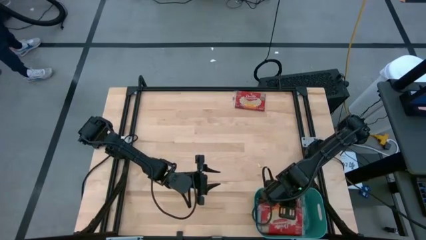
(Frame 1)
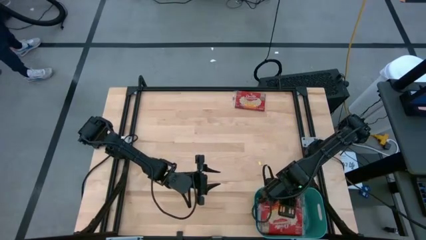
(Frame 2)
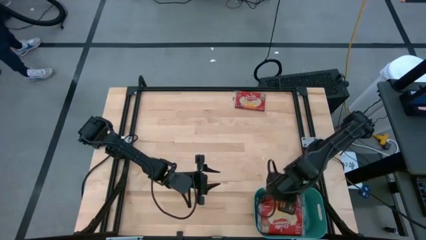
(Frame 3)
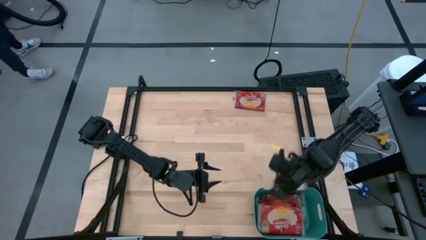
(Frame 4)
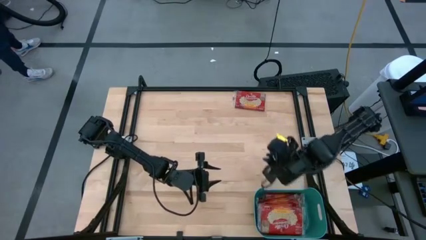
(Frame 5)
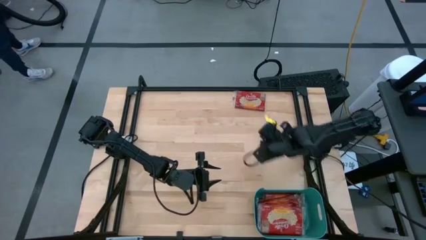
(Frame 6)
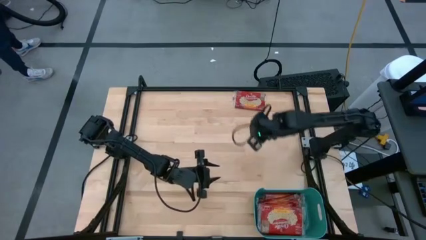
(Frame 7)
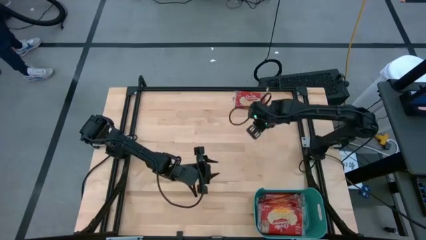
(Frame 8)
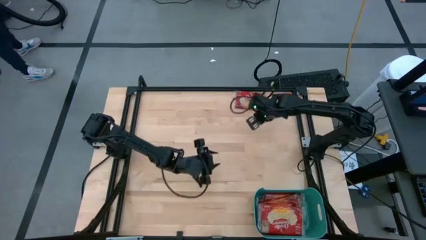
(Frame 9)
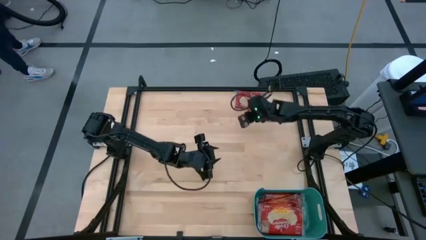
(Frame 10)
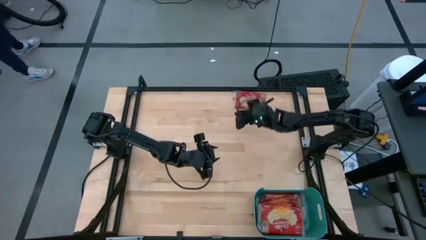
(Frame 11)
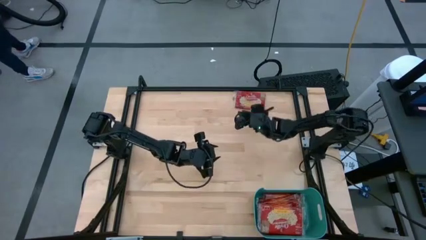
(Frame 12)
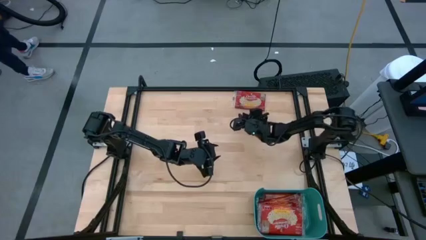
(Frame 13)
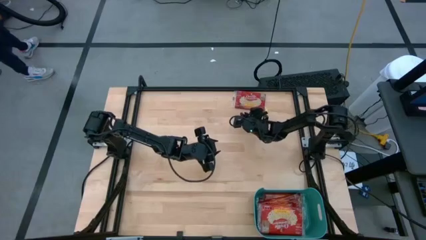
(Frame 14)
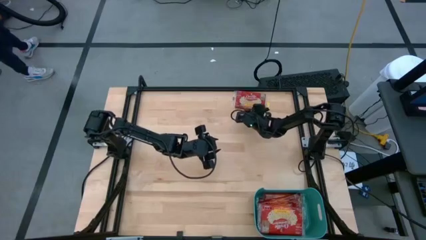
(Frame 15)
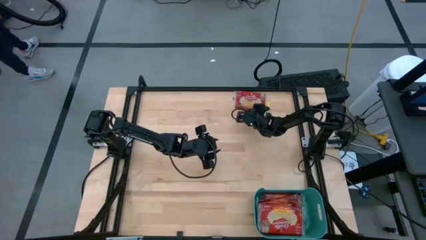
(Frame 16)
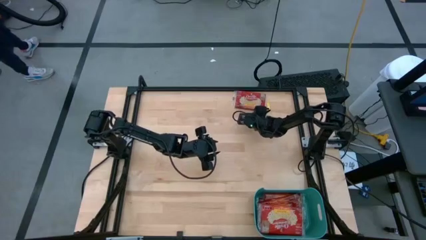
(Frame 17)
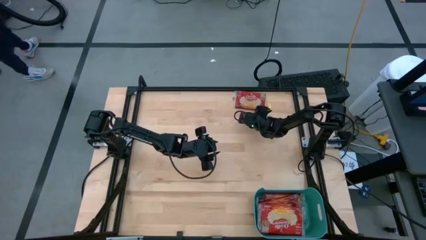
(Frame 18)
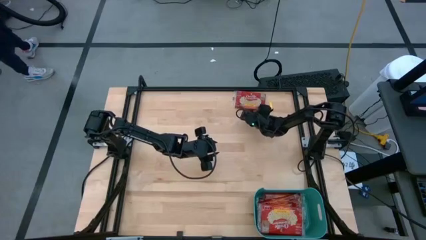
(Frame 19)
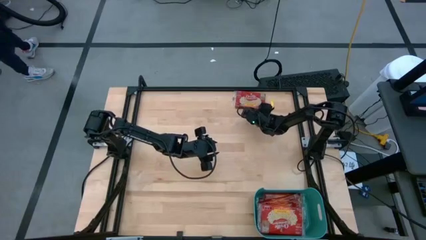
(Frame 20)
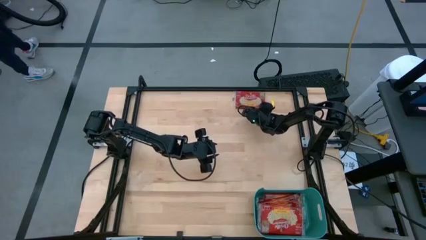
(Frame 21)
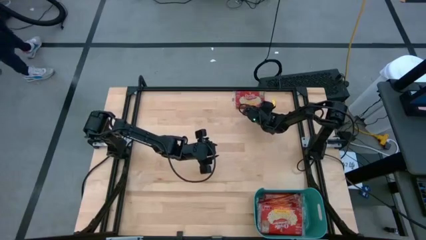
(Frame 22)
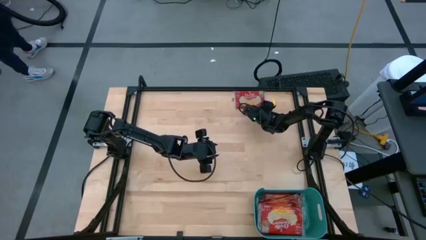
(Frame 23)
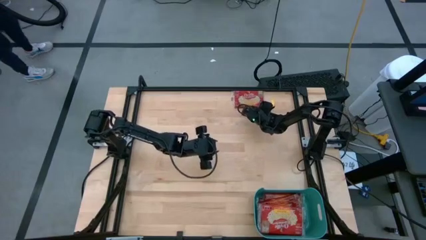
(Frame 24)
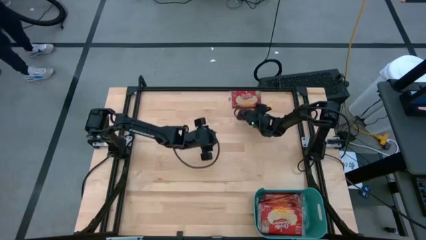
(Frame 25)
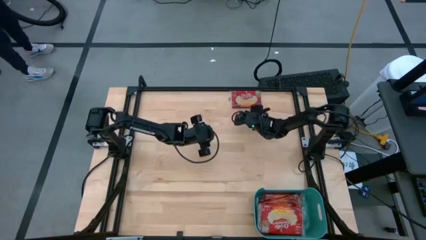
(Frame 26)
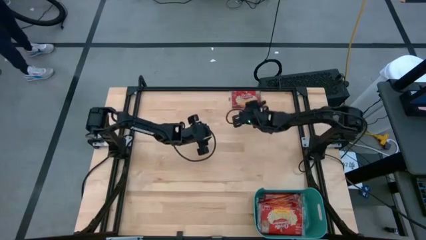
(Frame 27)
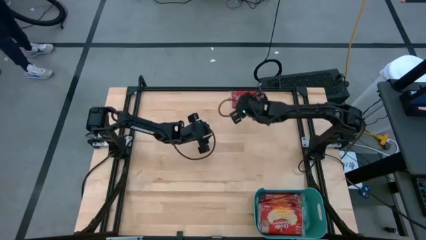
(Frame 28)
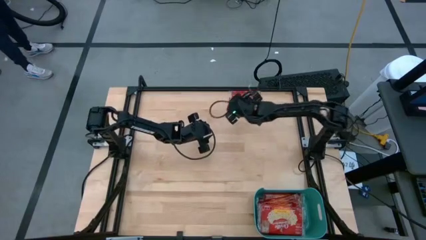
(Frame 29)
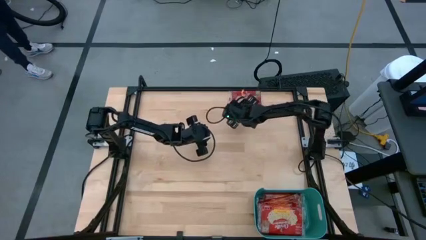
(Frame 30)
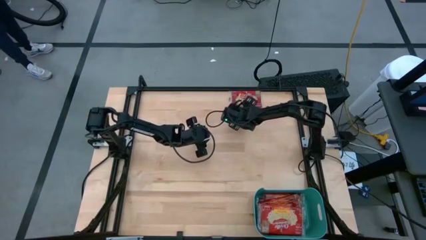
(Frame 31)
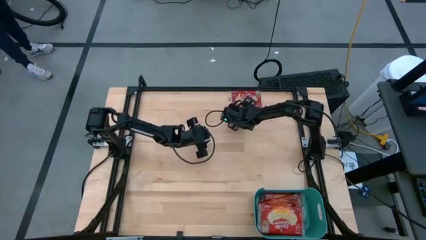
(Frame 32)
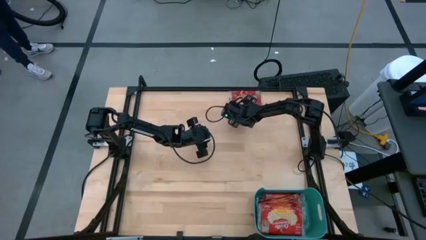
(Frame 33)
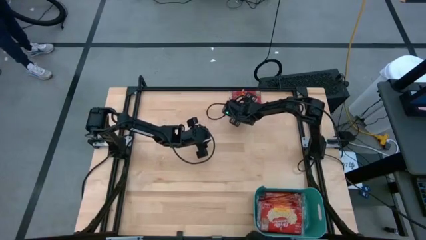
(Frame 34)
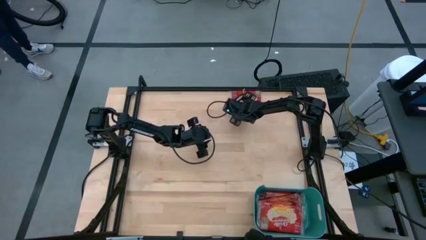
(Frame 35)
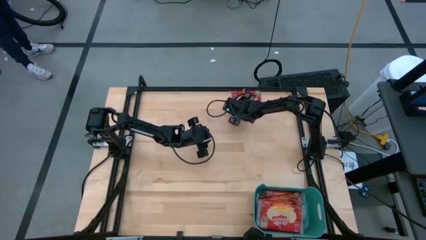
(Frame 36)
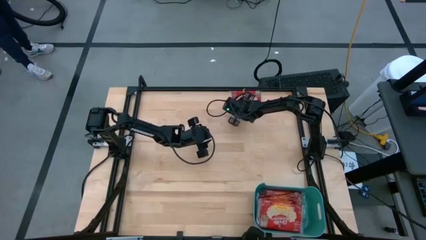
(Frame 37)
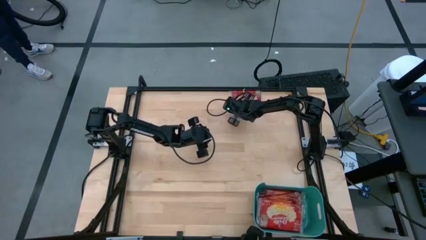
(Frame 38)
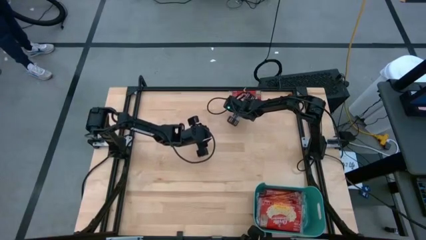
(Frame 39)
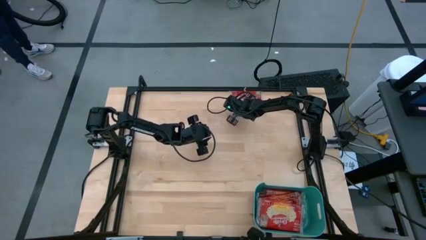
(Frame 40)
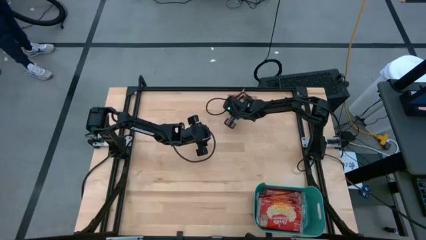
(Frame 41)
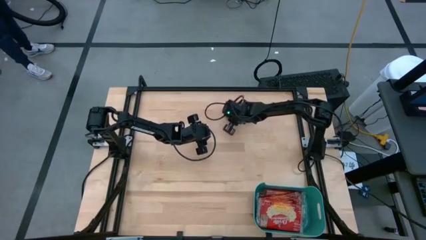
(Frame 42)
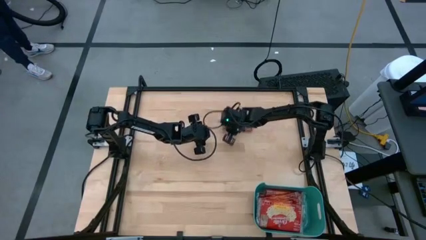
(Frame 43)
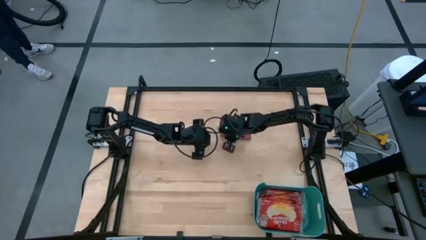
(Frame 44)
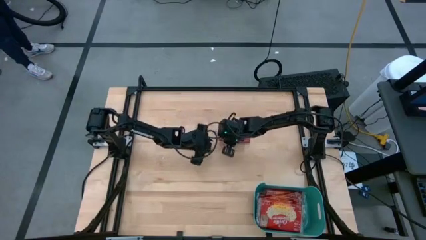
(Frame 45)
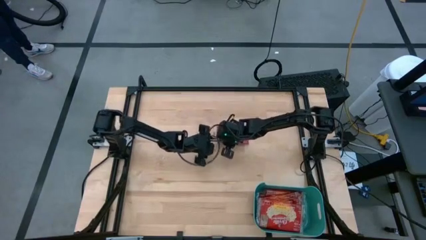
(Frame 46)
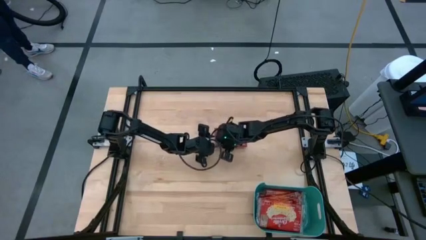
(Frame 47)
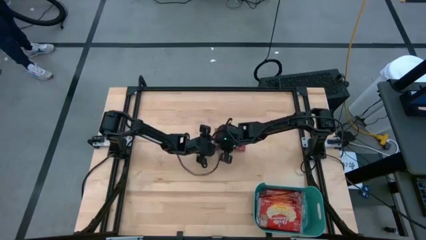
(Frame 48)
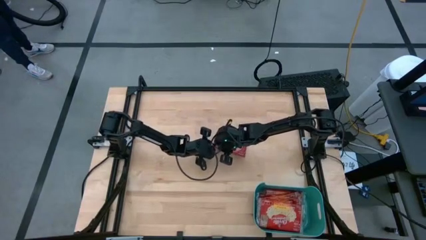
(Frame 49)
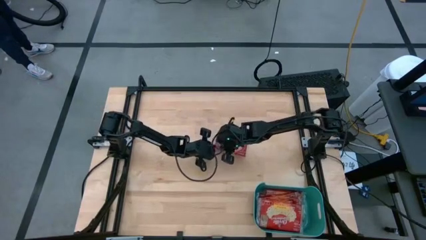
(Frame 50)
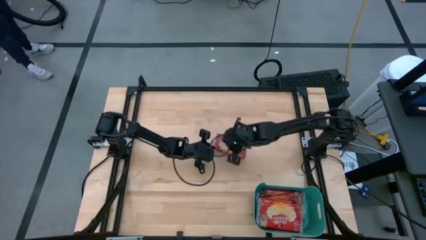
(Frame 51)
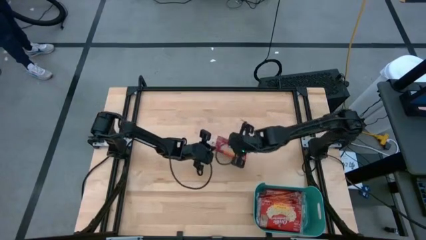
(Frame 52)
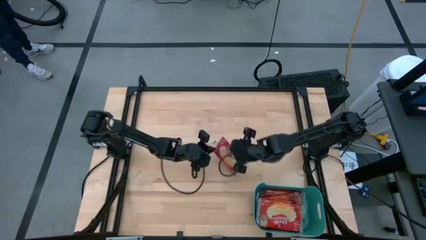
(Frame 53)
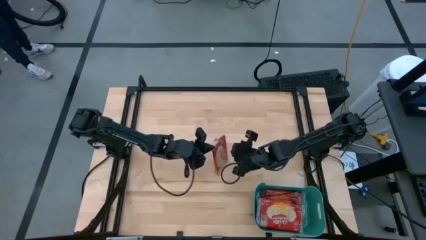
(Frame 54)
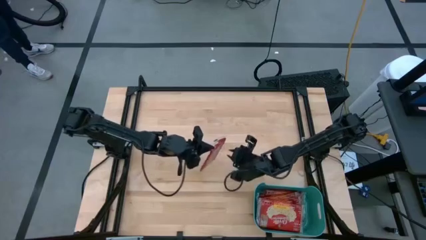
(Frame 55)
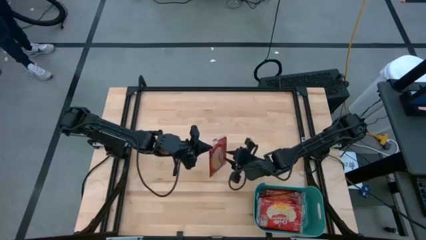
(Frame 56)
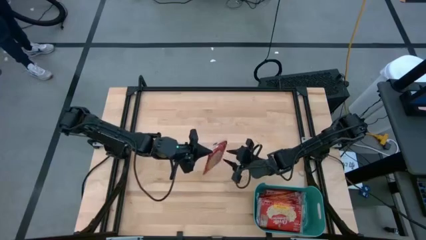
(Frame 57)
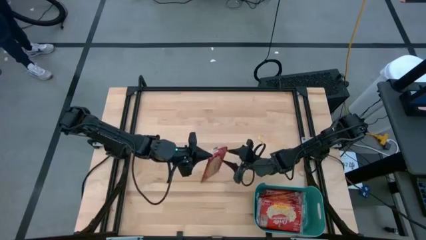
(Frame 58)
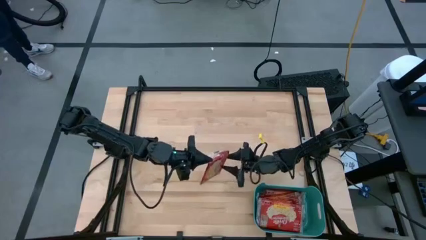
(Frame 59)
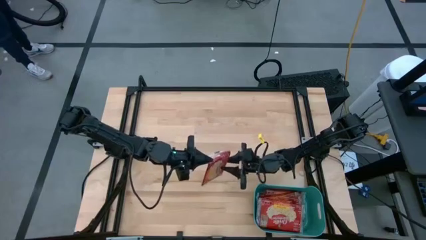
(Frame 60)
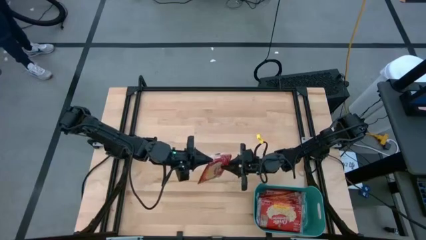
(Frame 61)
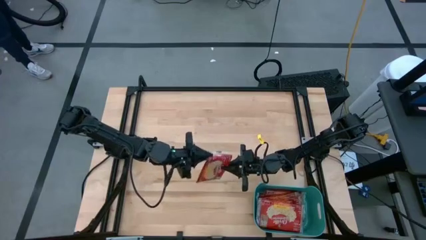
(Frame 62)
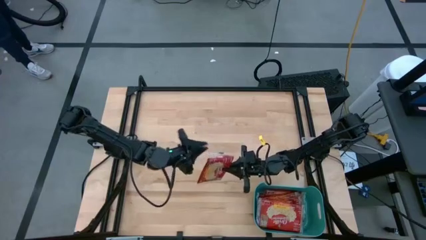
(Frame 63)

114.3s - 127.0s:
Task: Sort popcorn bags into baskets
Put the popcorn bag into the green bin

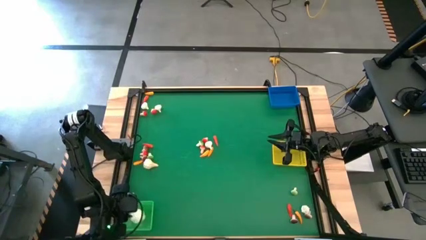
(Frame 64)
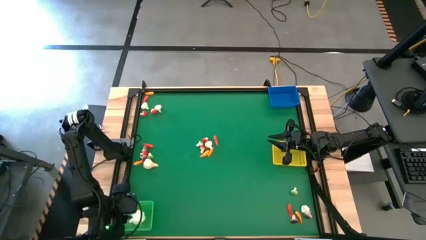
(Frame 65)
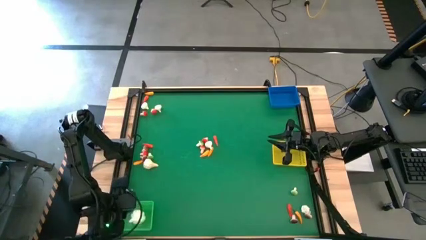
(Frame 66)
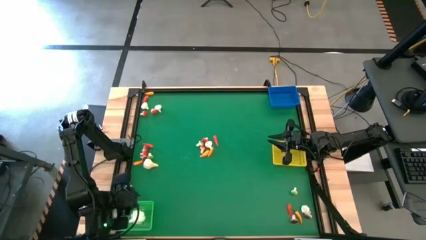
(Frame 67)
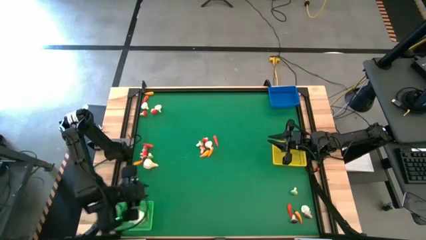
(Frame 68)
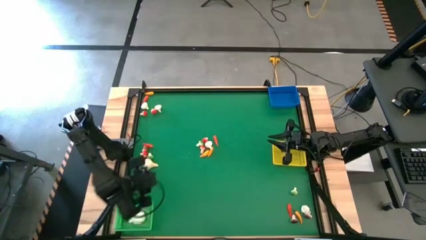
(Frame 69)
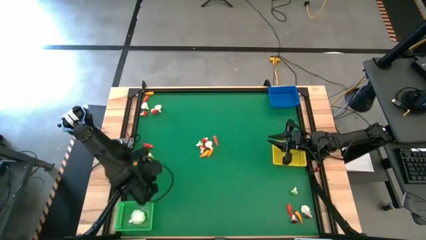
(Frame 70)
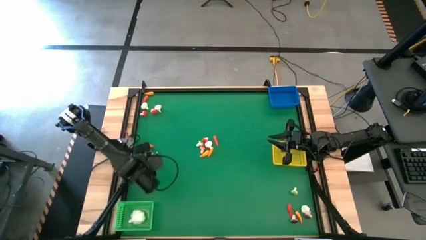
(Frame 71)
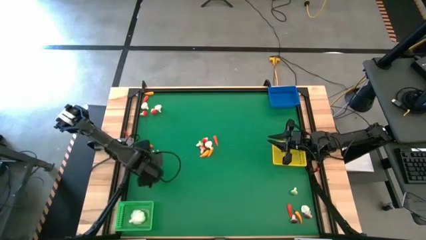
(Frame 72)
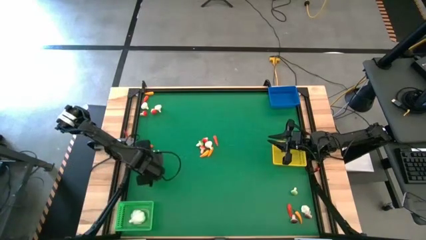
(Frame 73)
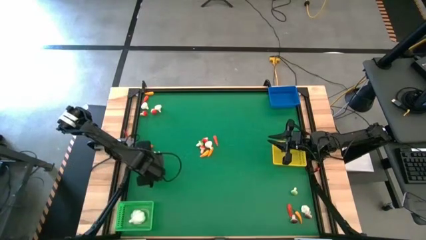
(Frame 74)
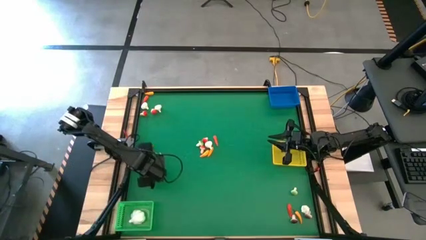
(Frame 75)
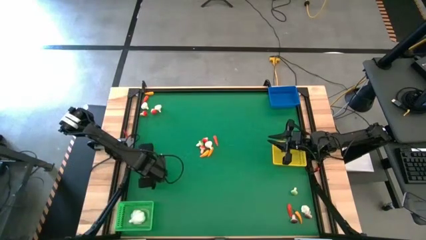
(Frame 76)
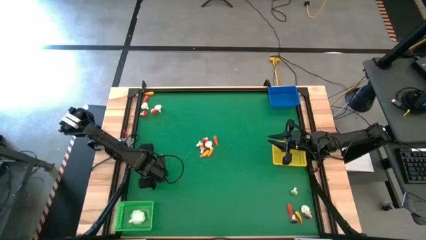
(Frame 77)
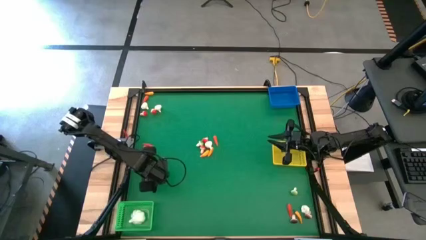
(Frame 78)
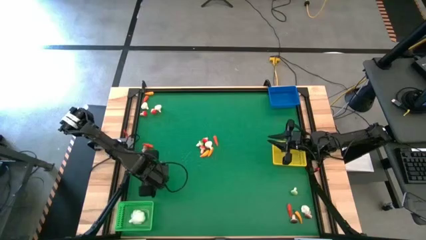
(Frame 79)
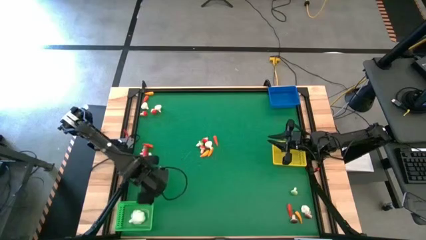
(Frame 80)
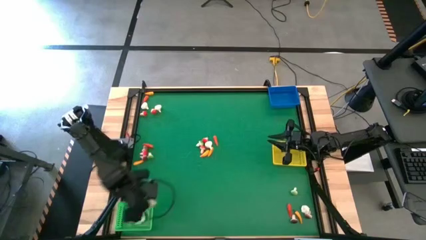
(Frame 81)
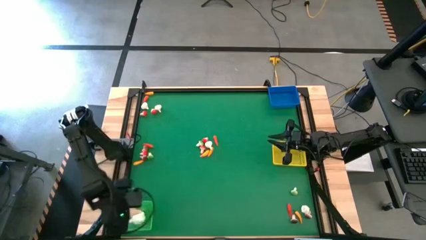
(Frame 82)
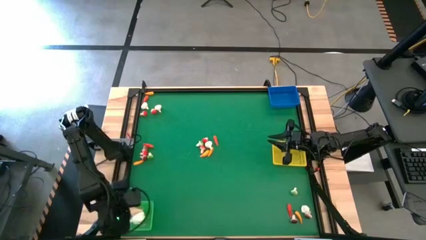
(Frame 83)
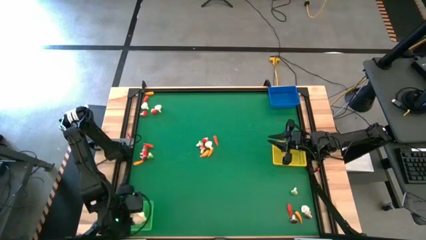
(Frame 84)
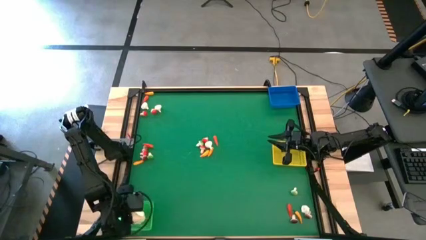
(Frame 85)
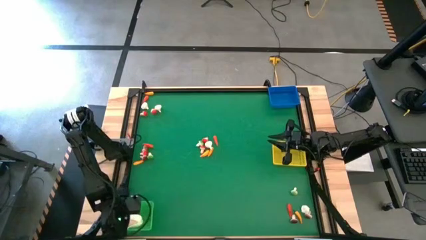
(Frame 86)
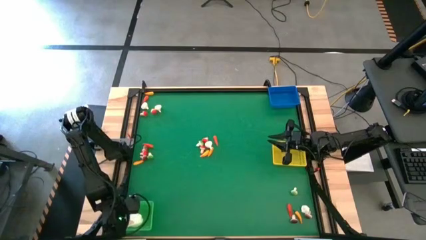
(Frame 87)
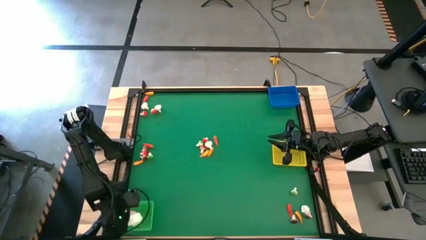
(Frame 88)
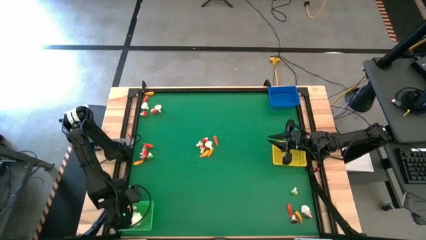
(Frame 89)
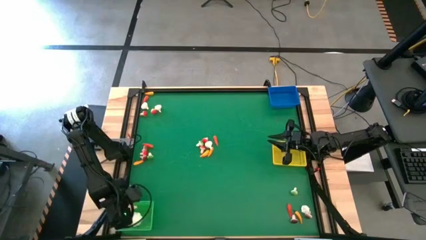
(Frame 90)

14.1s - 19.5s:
Task: Sort produce into baskets
Put the white garlic into the green bin
